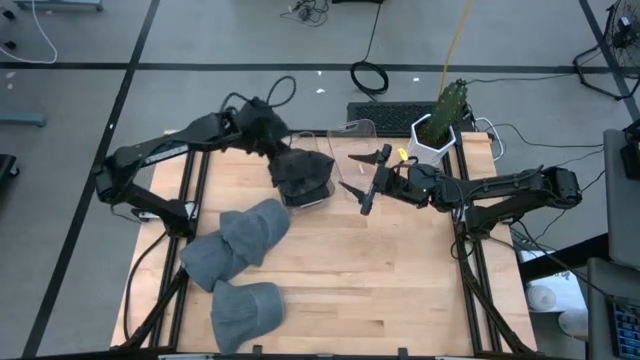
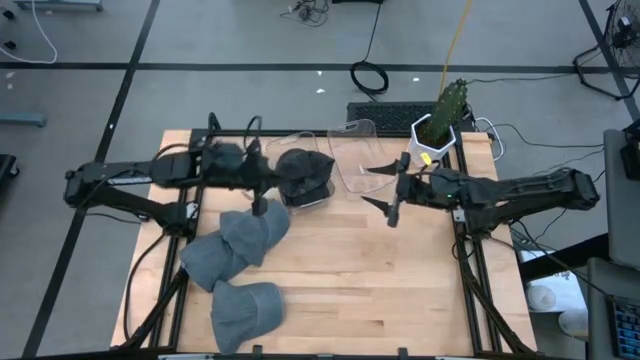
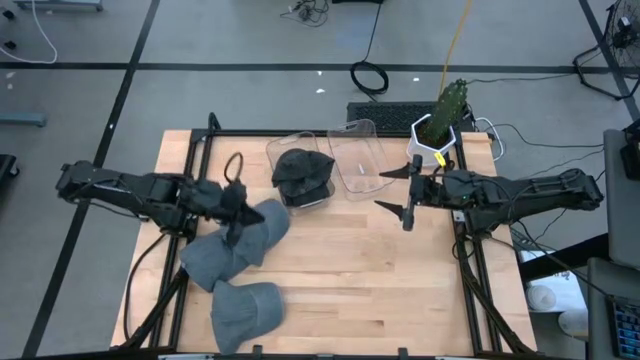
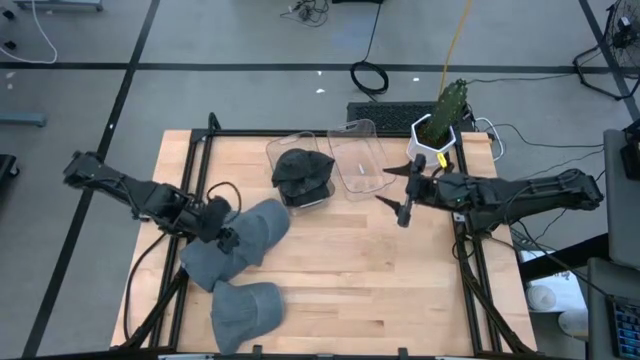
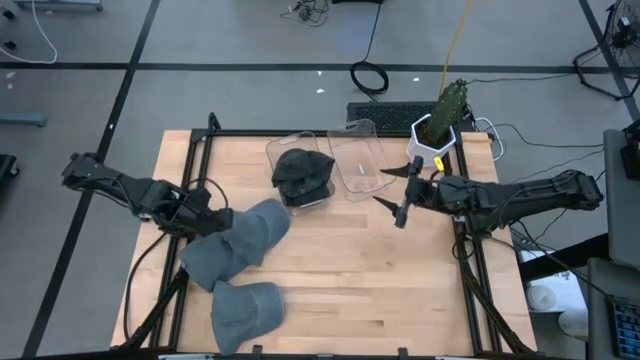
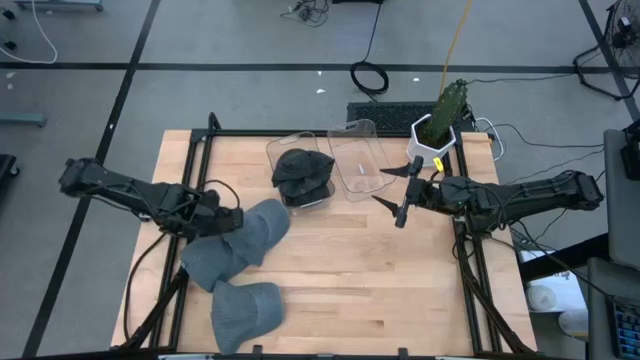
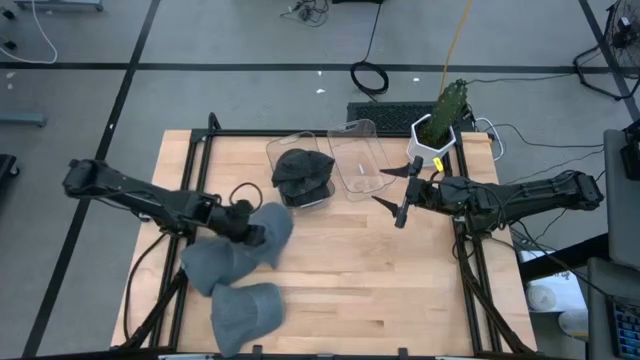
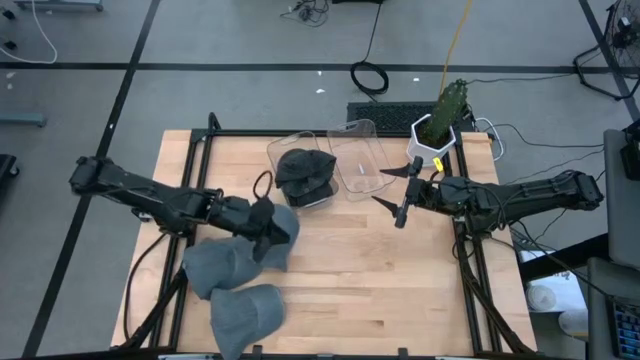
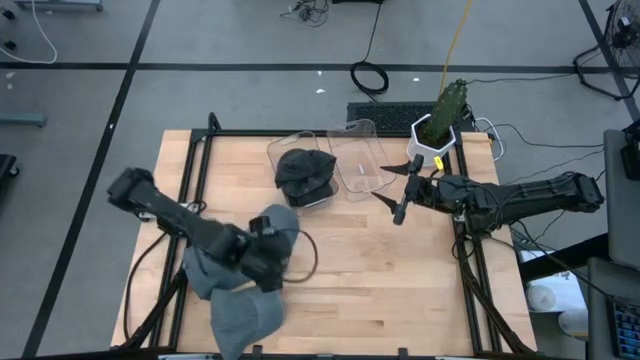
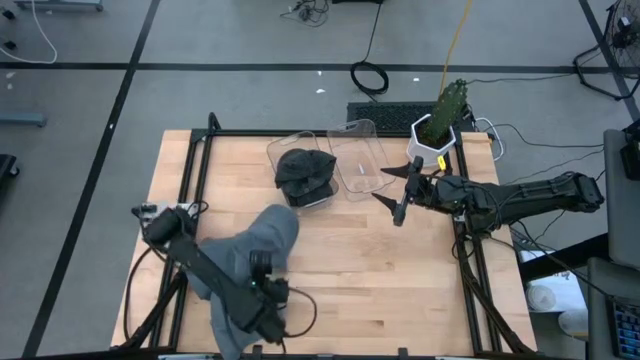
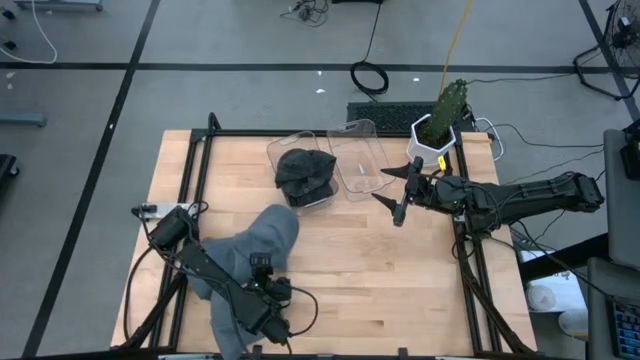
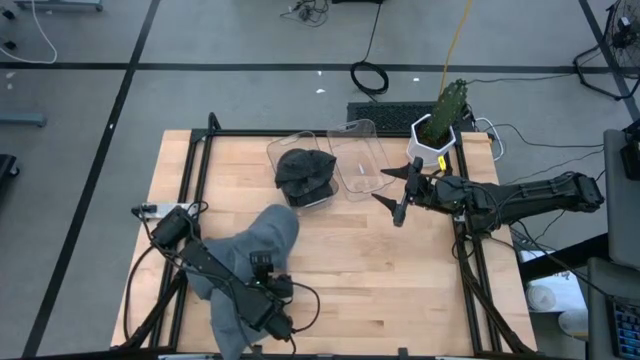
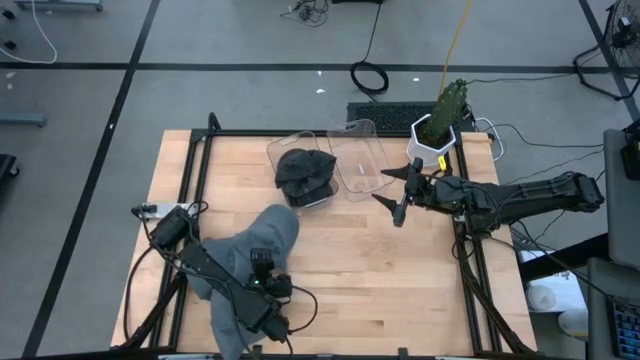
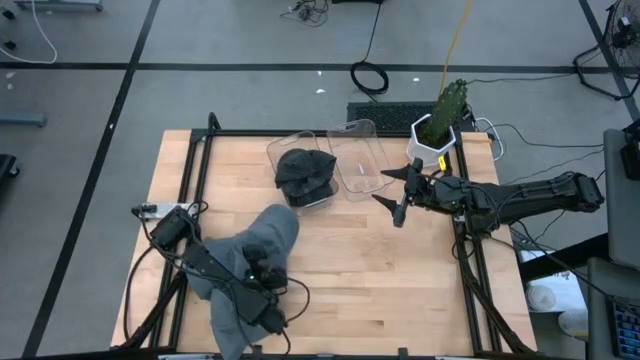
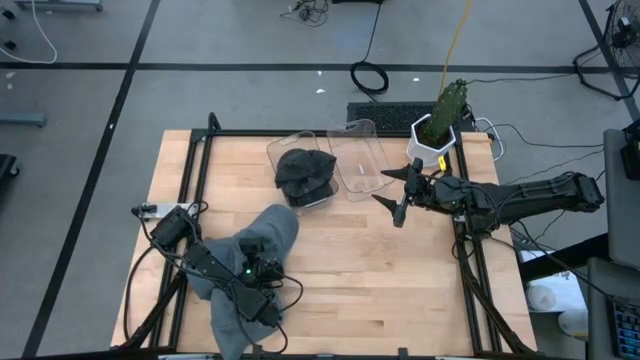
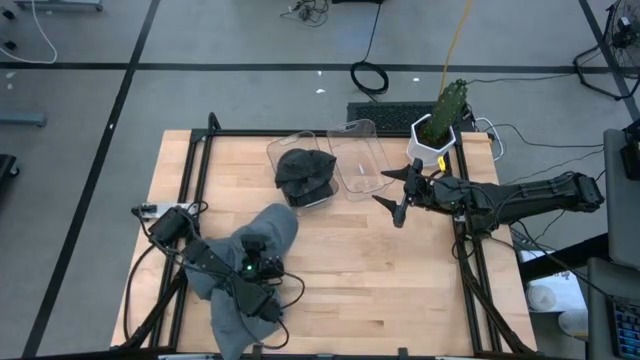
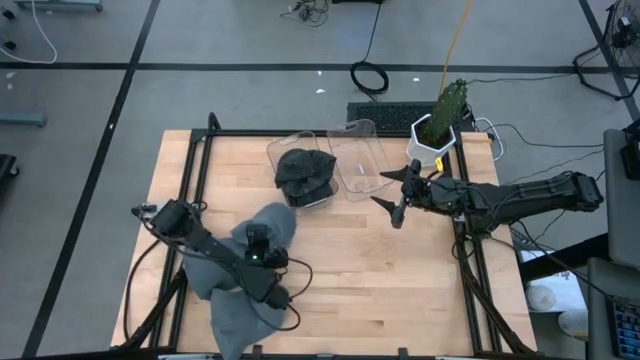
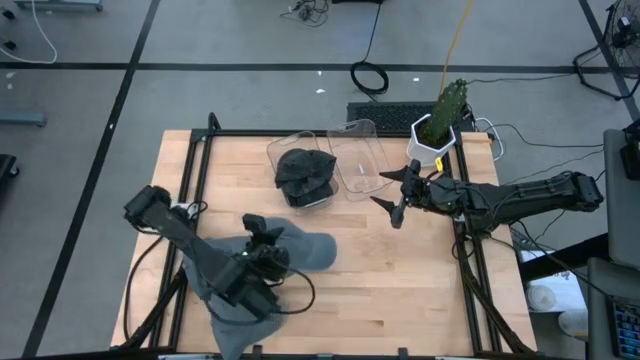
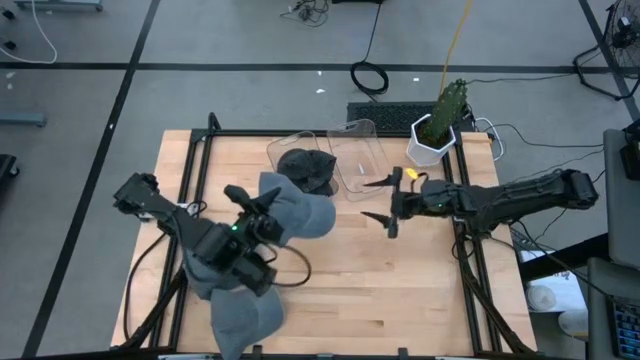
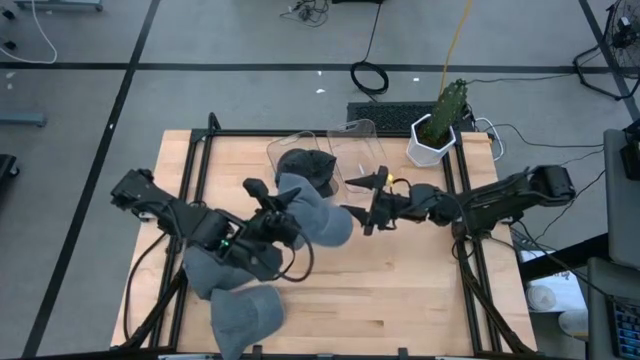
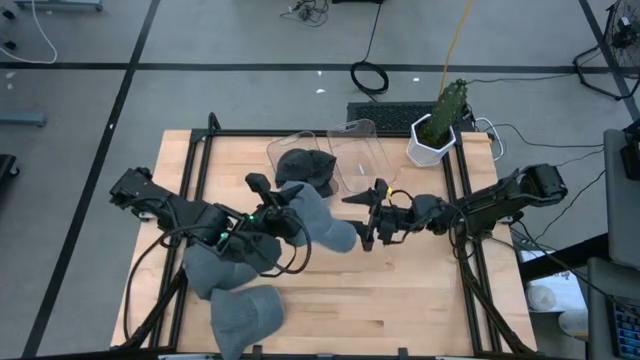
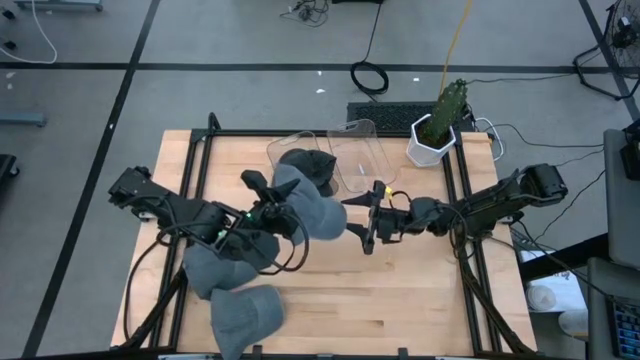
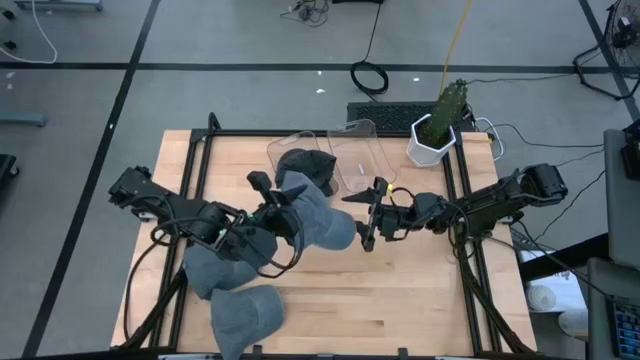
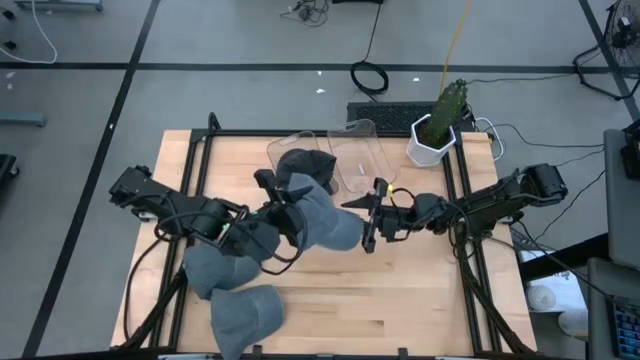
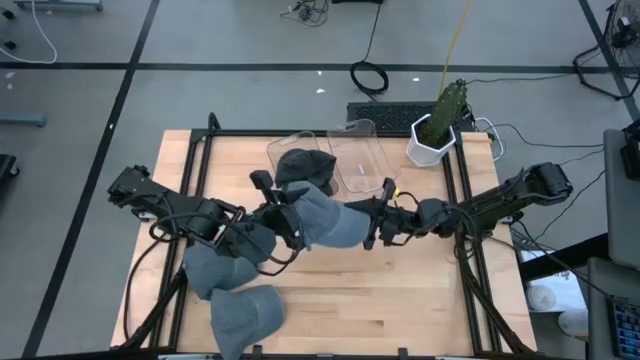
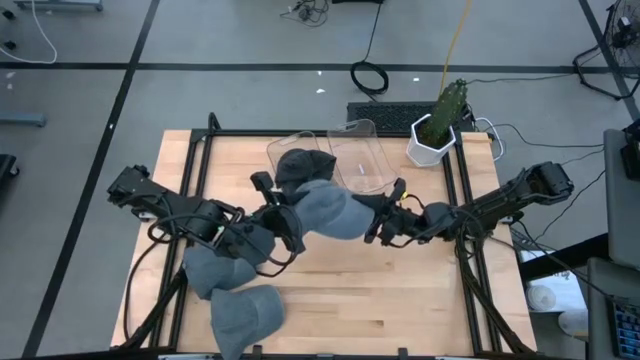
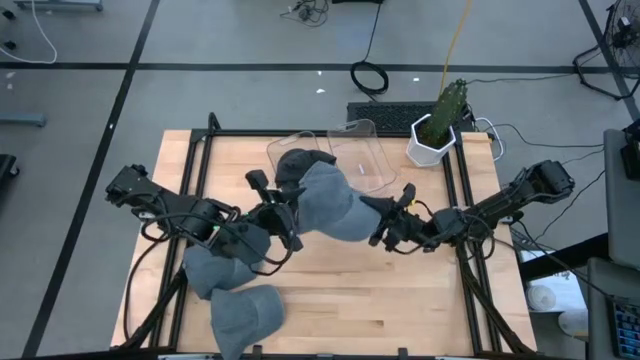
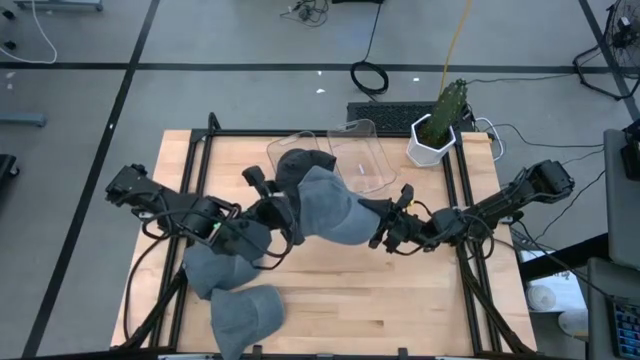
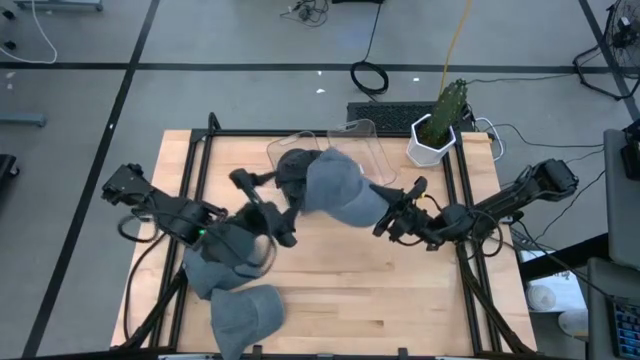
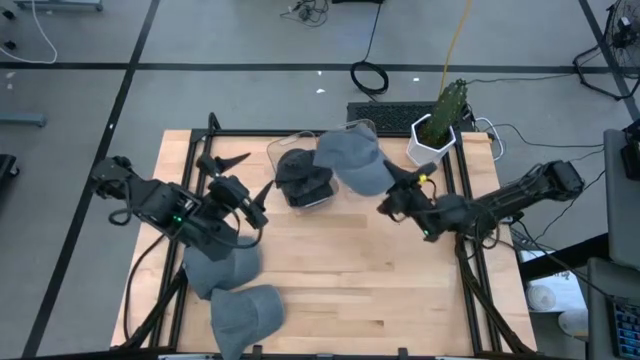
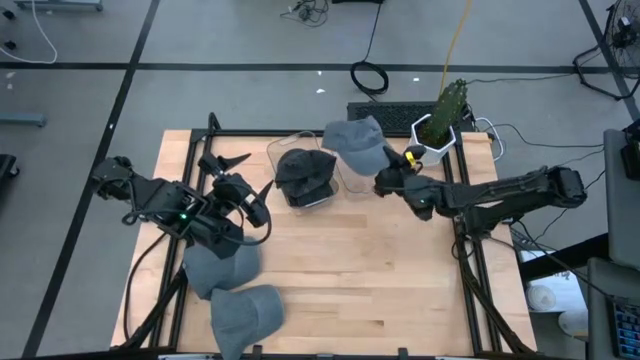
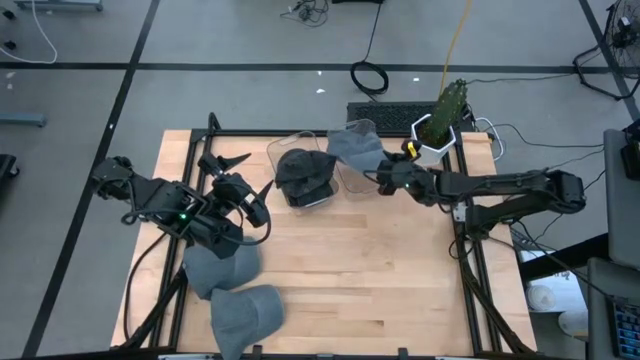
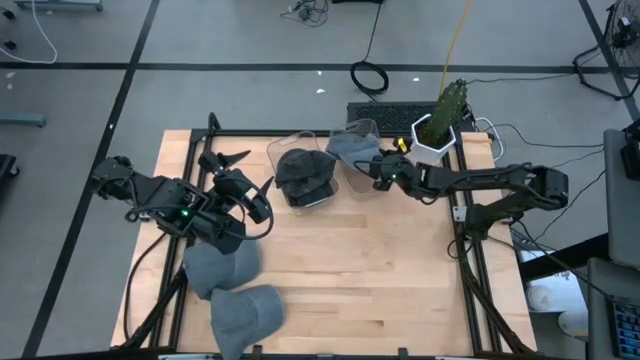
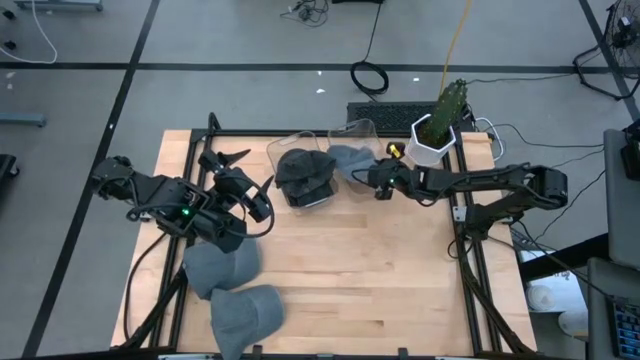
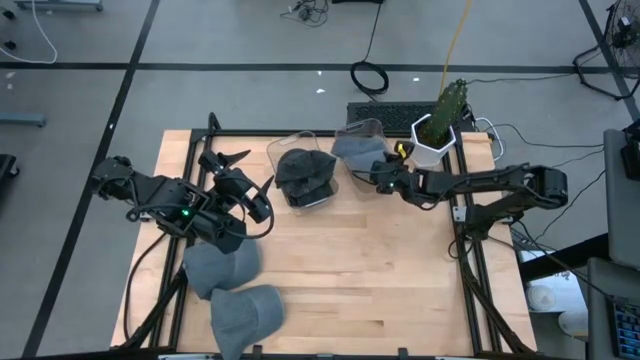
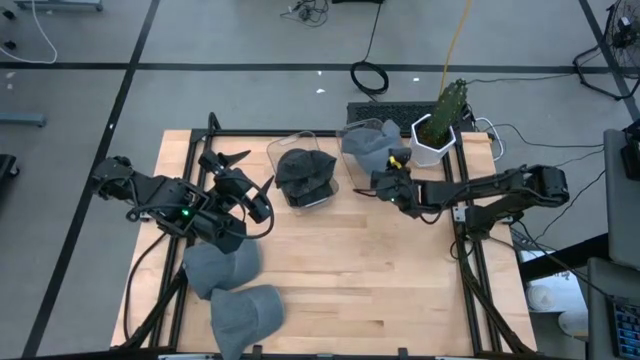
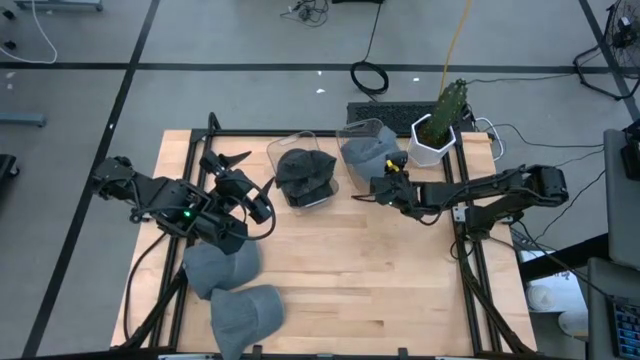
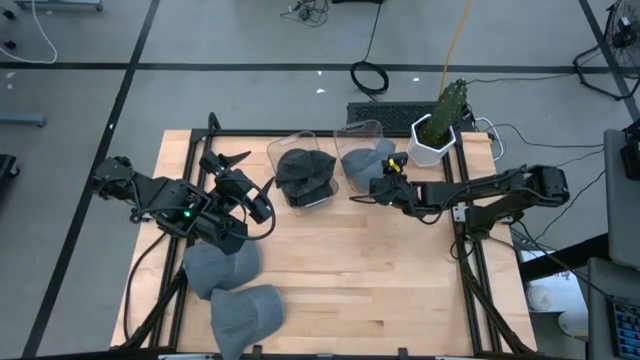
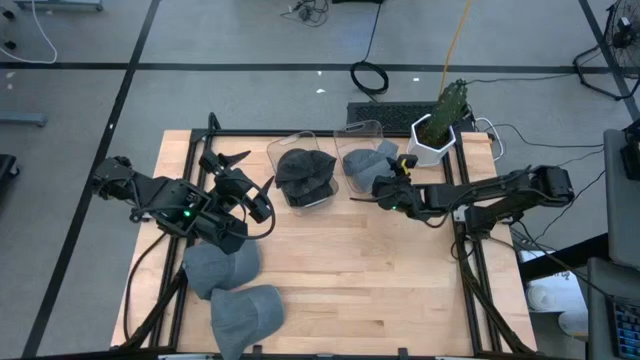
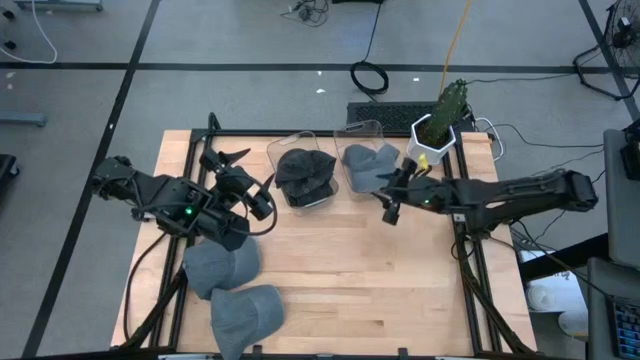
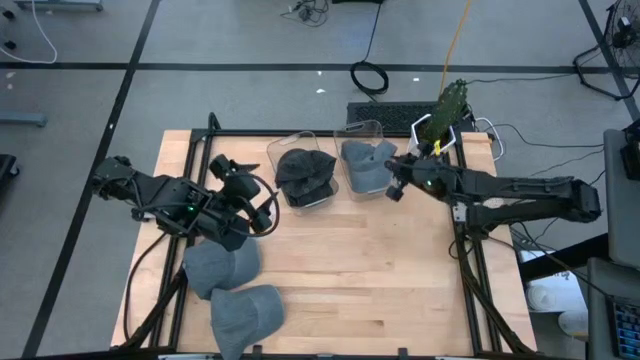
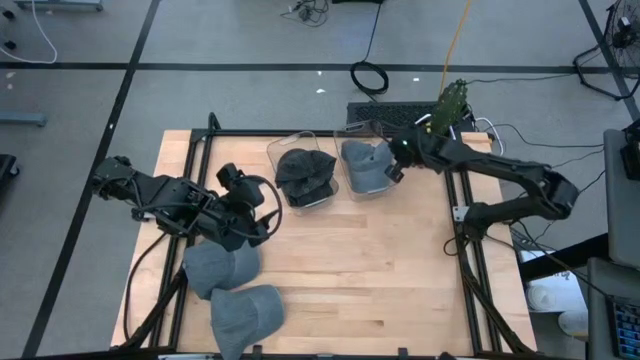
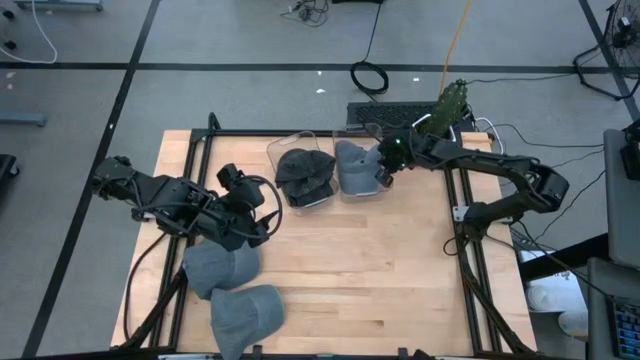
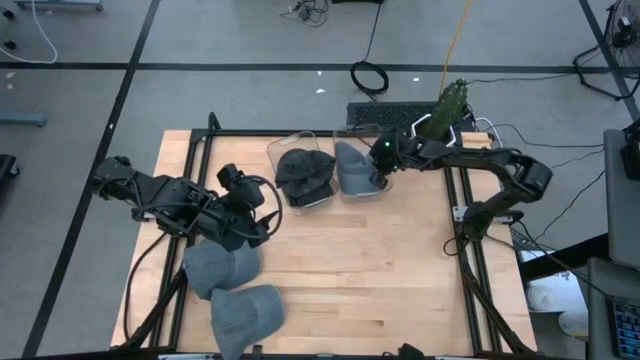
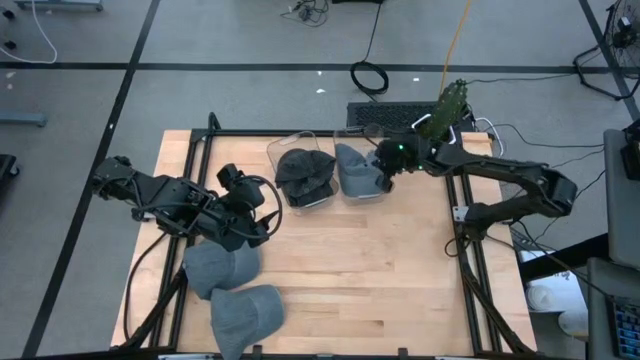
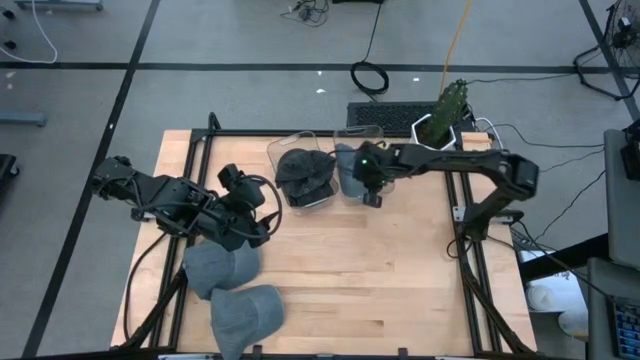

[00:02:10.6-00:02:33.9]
Task: Pick & Place hat
Put the top gray cap into the right transparent bin
